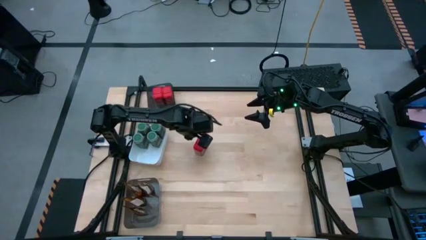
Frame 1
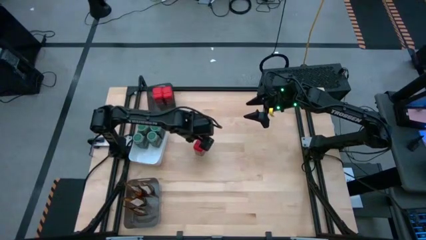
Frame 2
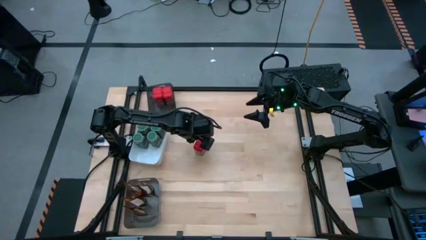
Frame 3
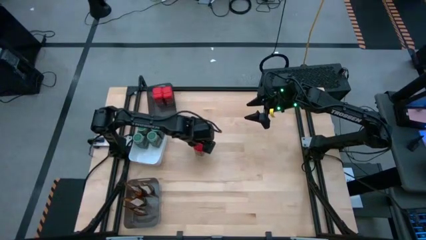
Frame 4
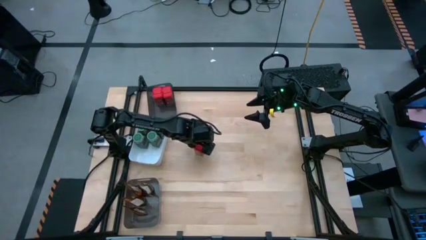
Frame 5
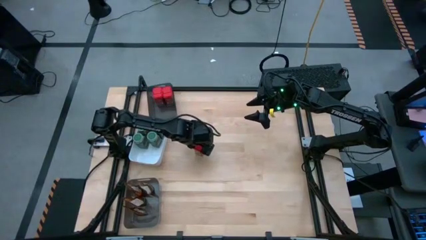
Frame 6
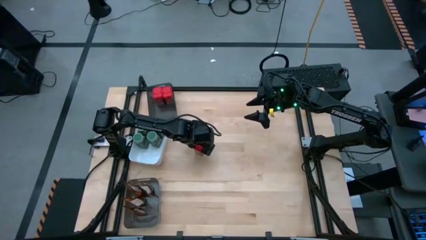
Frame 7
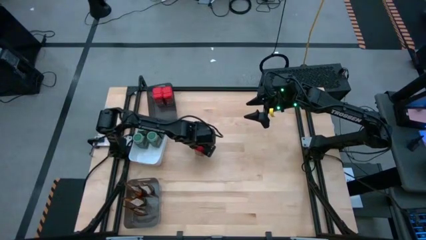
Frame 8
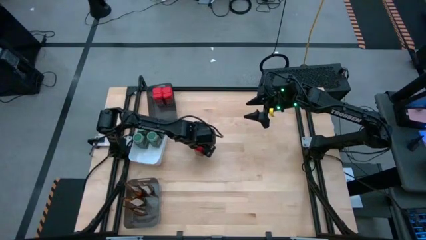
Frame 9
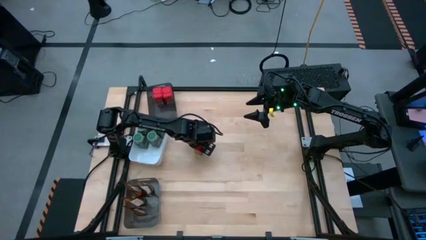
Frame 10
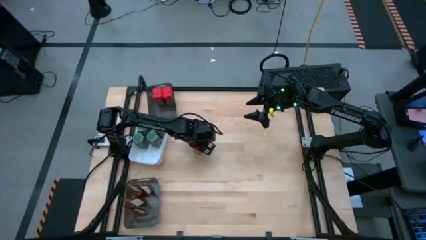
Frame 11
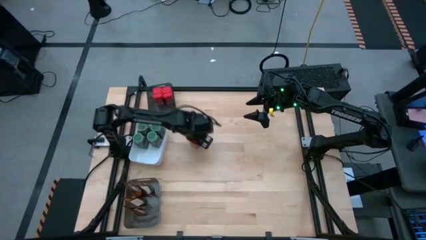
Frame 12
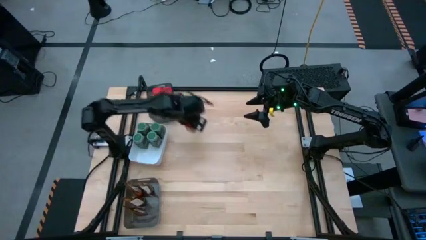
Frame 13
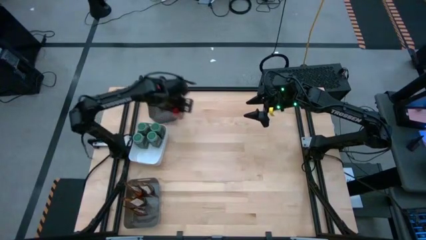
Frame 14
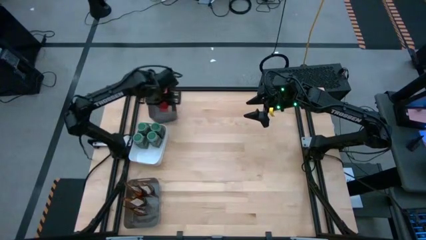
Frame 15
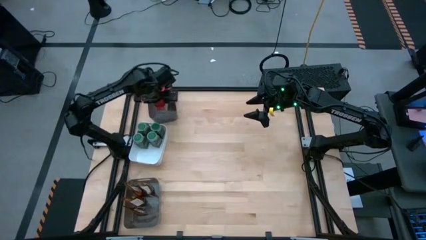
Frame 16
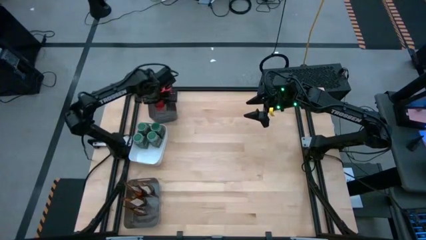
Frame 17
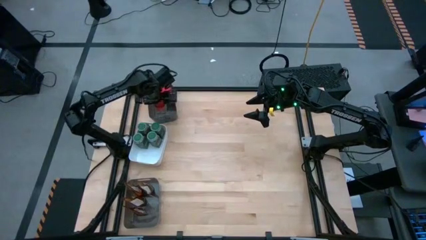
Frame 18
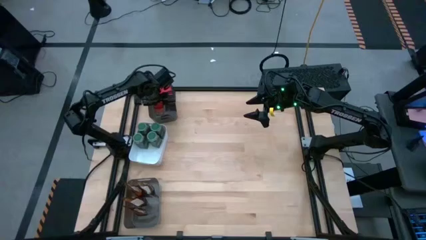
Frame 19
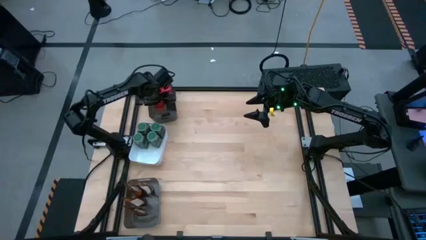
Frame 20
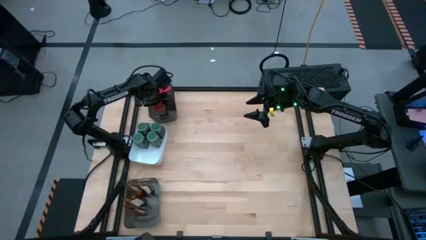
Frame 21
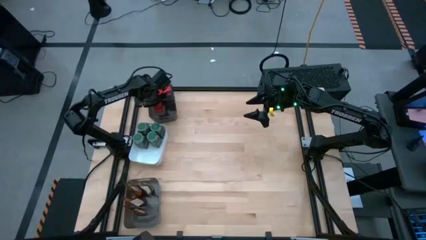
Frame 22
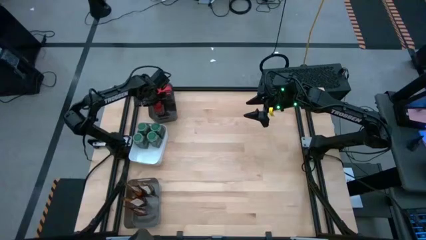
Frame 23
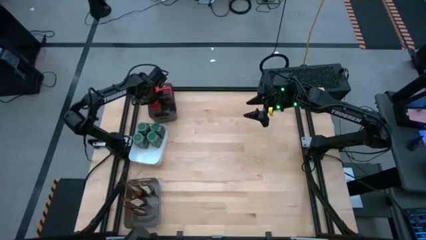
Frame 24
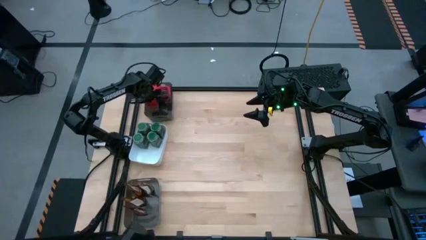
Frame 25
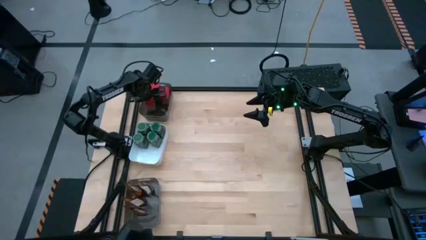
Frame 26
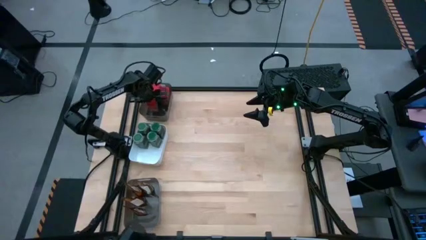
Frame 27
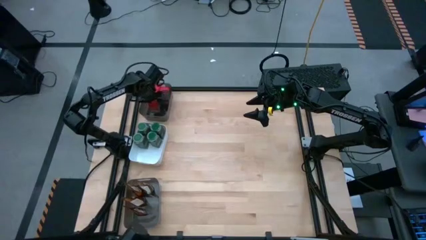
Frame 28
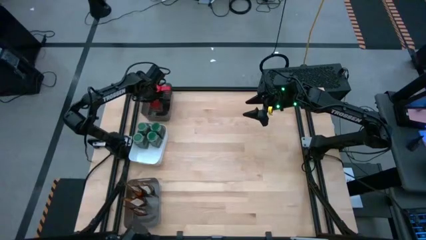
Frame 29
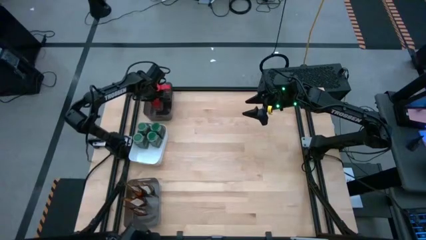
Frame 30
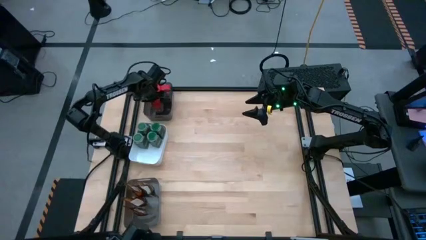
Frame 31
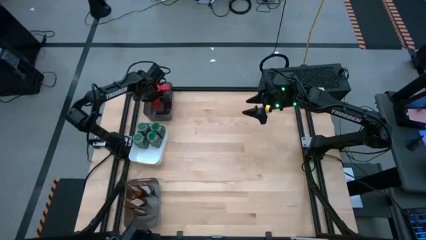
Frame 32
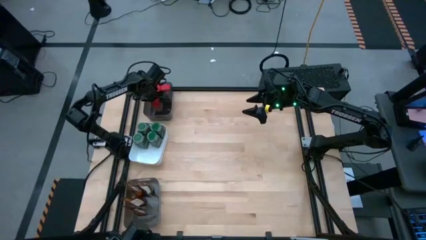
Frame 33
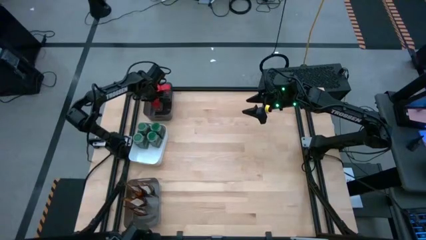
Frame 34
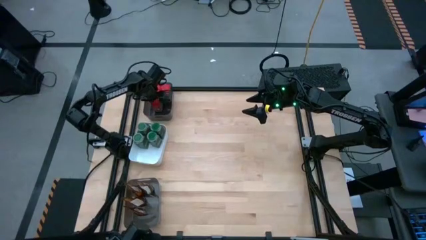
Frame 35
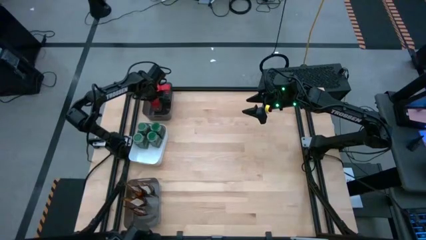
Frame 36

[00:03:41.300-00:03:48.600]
Task: Sort spices by type
Put the red seasoning can into the top black bin

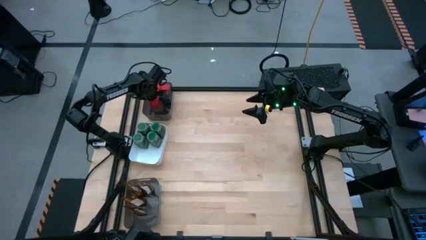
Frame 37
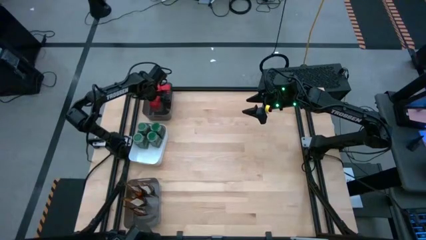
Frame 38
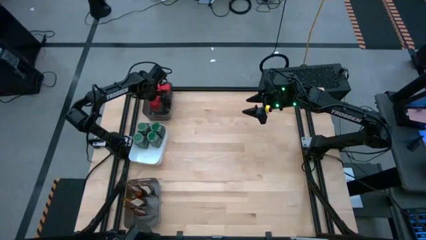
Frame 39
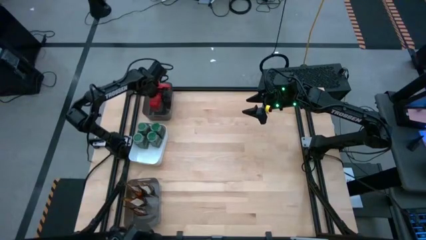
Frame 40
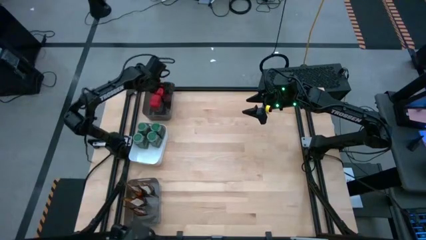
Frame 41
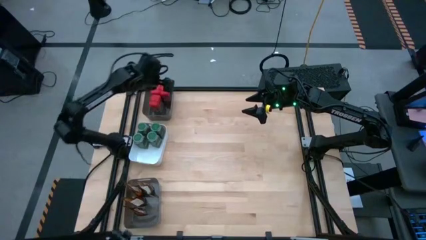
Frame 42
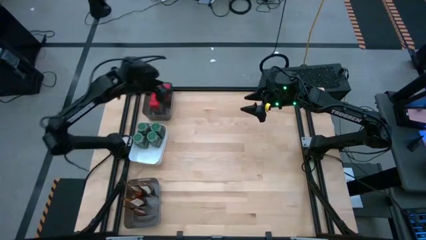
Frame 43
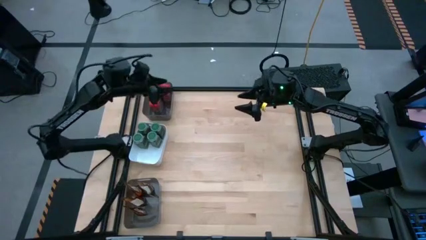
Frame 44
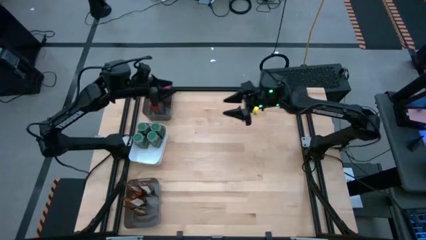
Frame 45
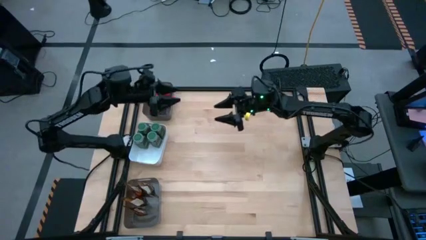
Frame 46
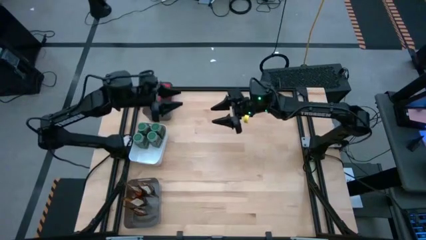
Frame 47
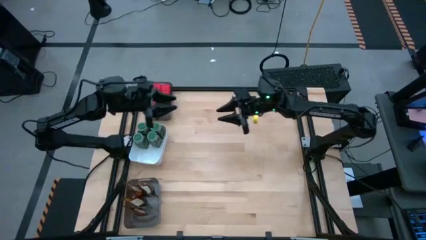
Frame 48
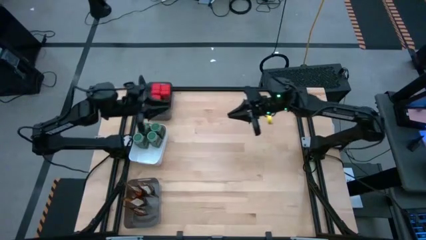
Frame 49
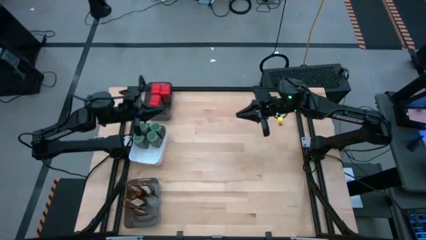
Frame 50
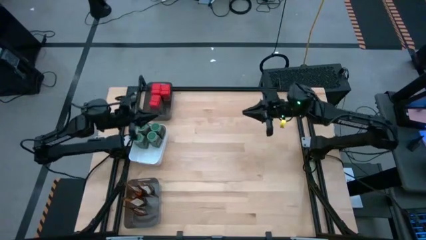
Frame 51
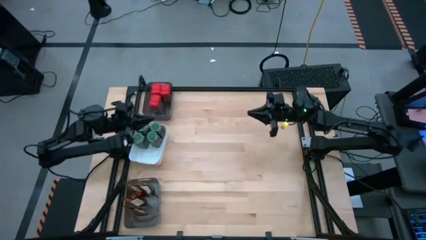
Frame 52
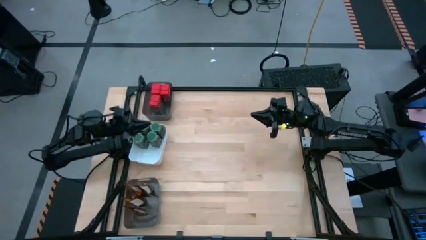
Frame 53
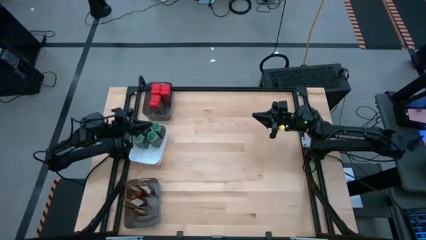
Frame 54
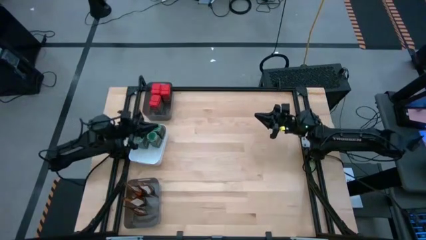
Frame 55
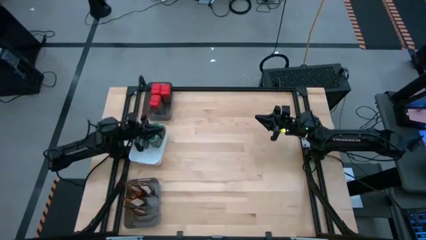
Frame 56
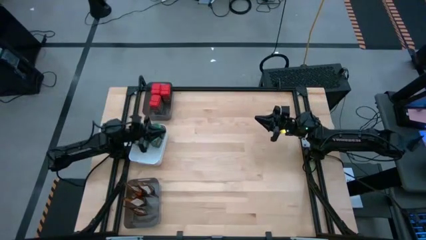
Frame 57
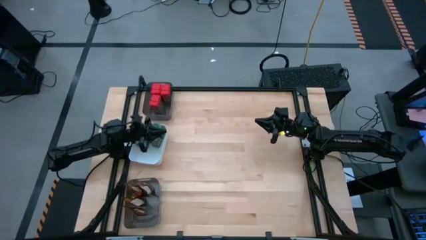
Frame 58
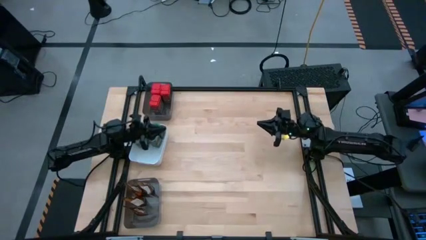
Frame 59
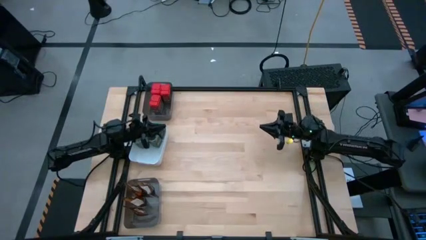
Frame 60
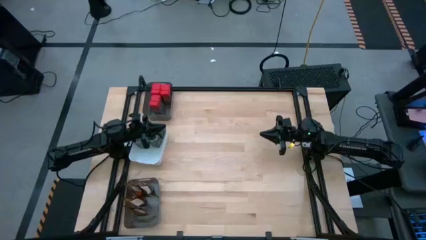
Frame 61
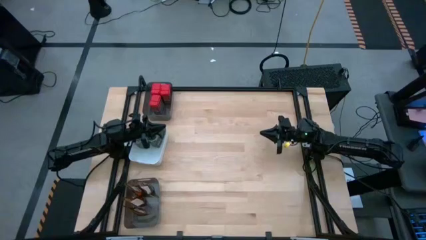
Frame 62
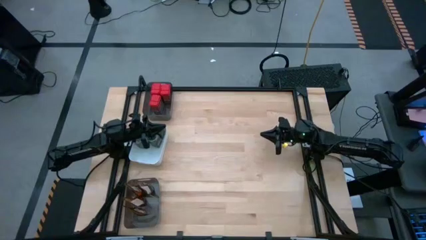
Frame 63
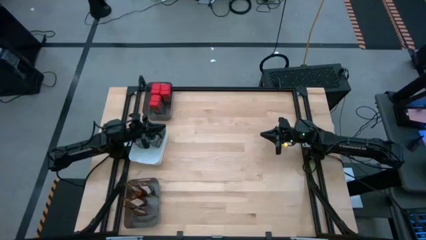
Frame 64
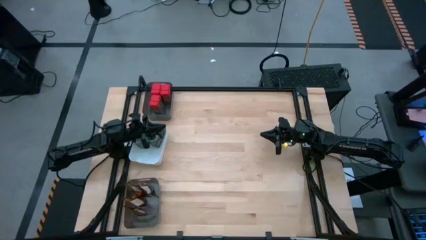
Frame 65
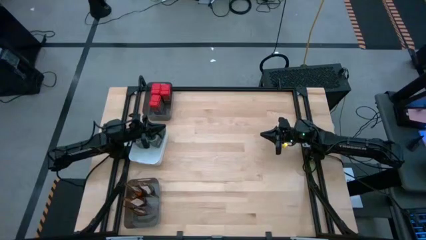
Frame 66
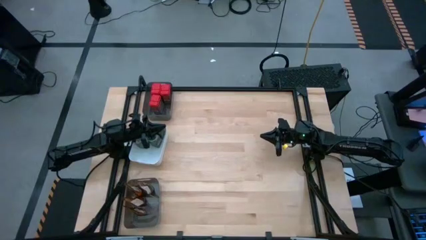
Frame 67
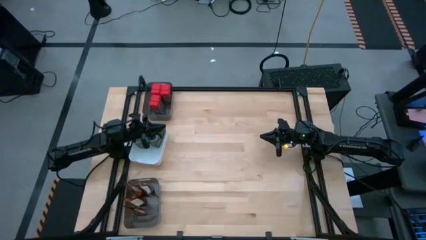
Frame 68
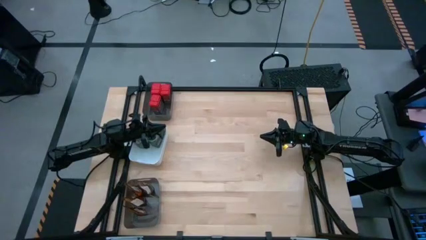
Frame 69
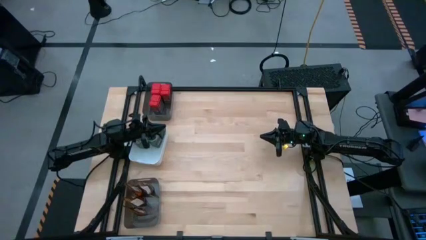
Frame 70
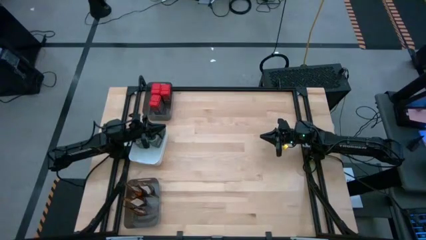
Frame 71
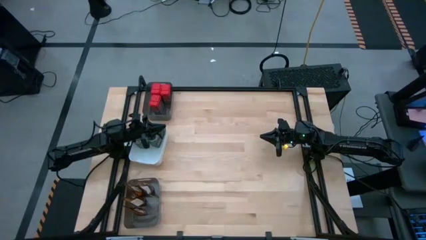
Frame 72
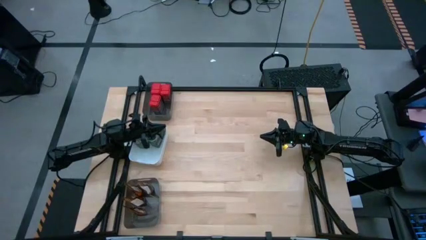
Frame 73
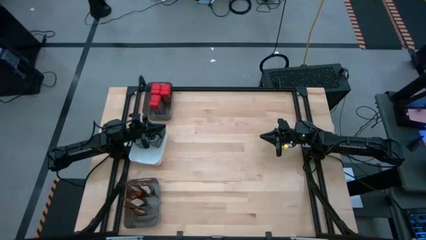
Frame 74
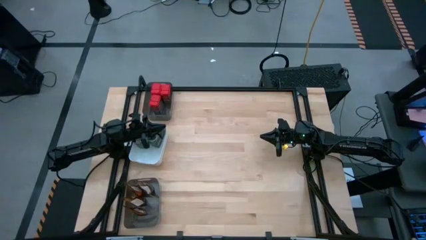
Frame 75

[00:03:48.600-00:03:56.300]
Return to Home Position
